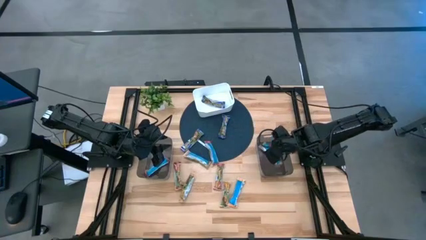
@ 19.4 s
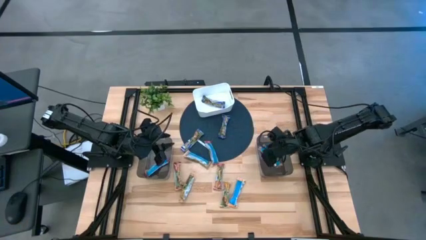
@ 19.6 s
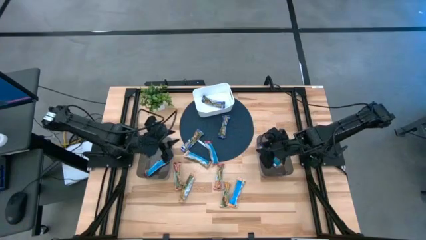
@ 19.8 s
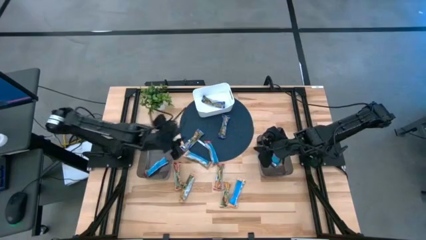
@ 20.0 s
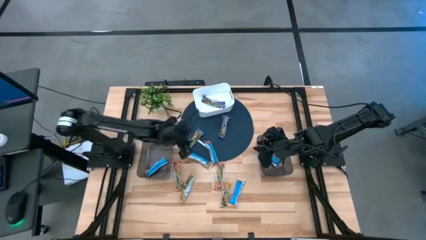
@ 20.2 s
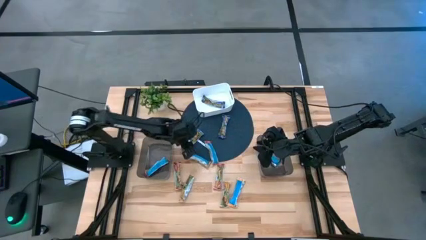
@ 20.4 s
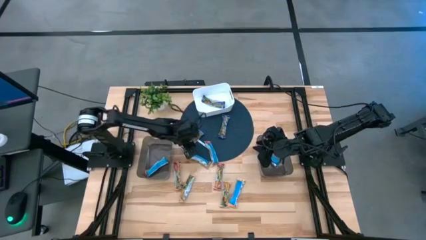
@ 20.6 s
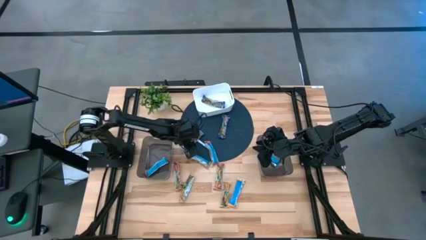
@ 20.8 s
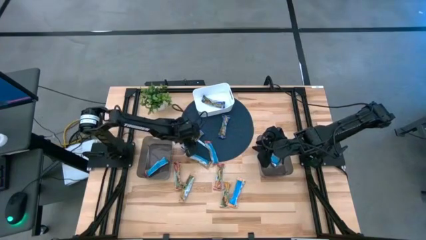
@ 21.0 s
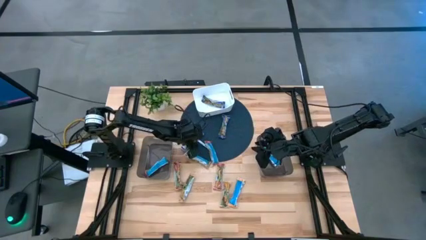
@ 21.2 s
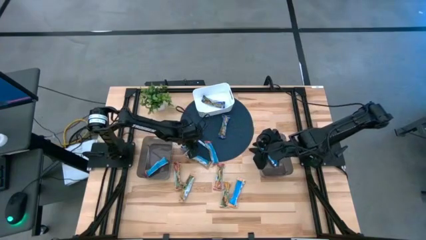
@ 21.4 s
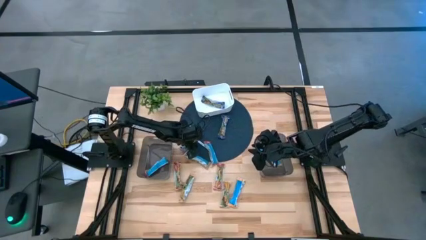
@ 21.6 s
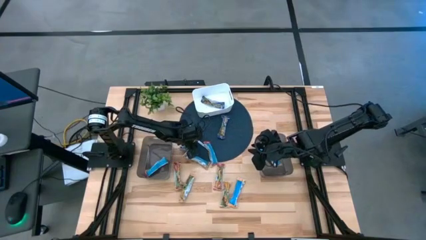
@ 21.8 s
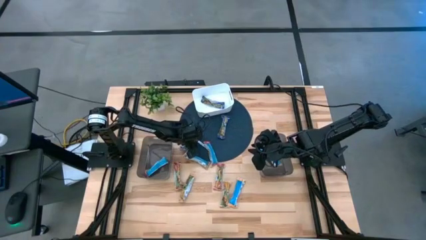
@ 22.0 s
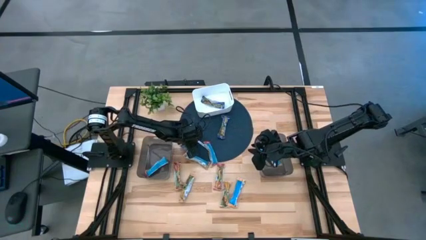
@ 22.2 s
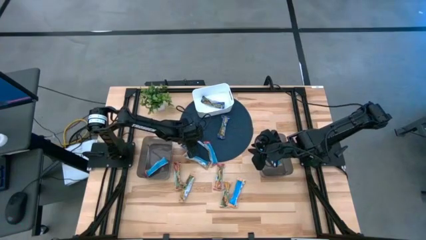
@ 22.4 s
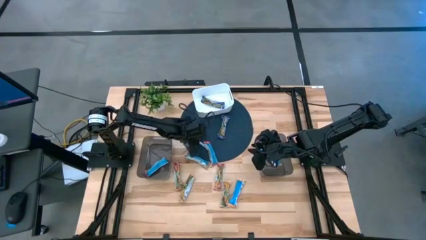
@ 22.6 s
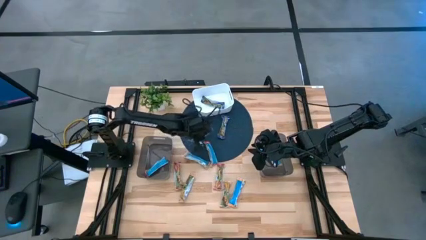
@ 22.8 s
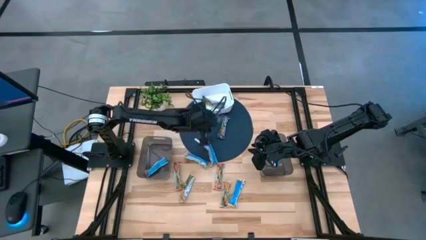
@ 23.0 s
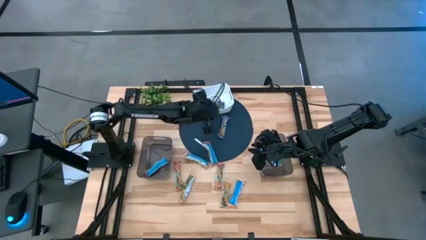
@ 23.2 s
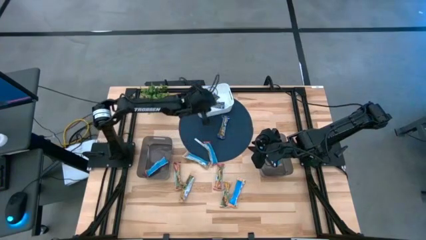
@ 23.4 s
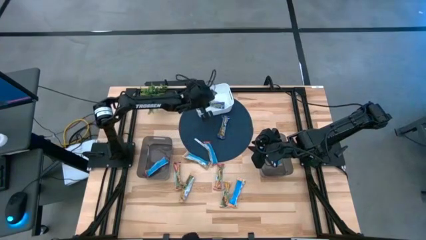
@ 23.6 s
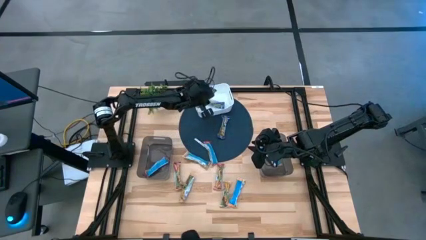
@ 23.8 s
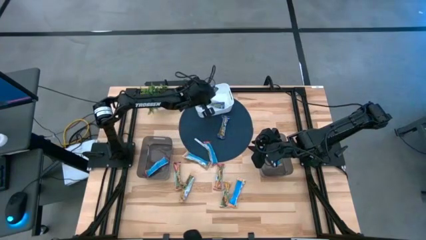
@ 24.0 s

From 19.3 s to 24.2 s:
Task: Pick and place Granola Bars by type
Put the blue granola bar into the white bin

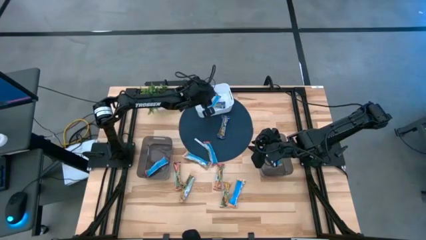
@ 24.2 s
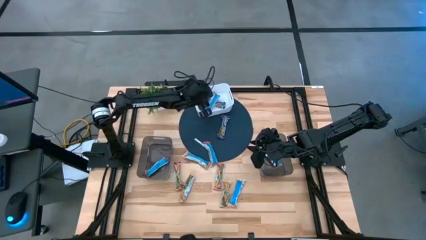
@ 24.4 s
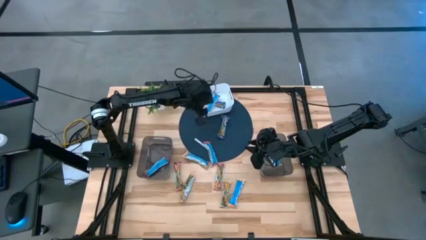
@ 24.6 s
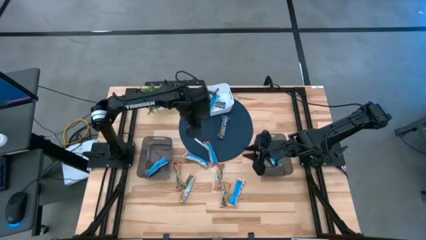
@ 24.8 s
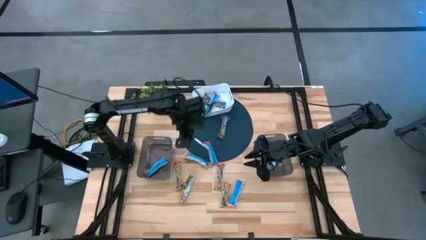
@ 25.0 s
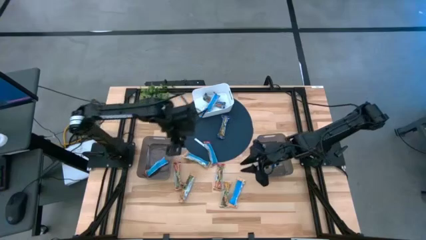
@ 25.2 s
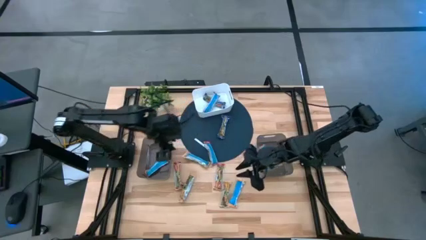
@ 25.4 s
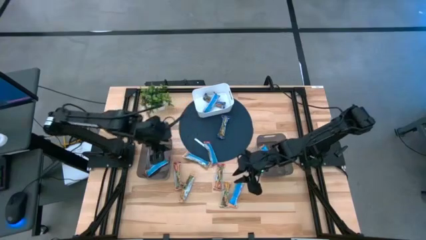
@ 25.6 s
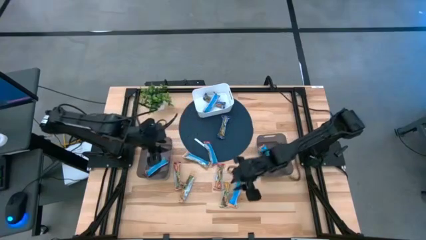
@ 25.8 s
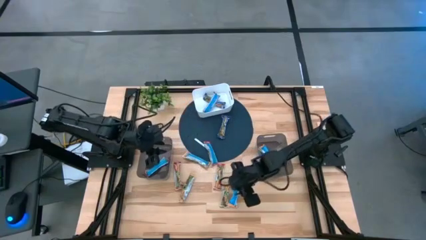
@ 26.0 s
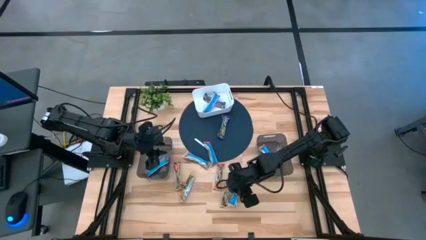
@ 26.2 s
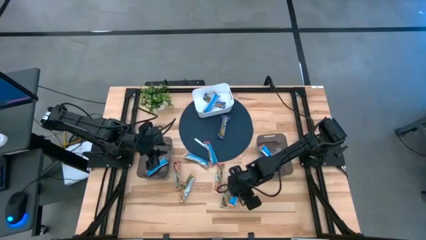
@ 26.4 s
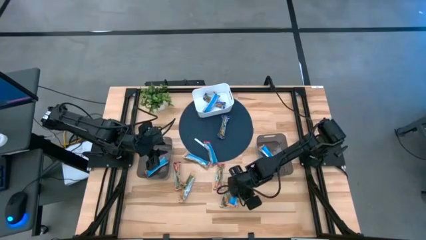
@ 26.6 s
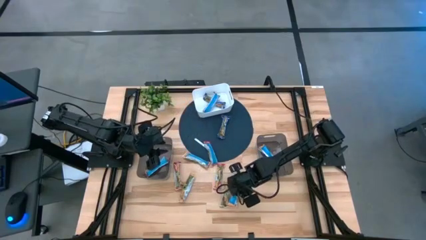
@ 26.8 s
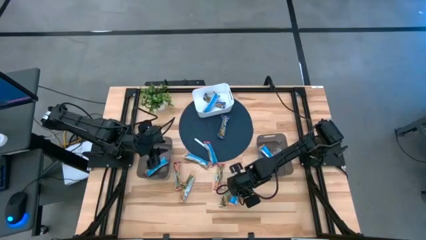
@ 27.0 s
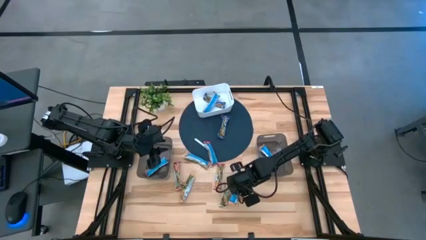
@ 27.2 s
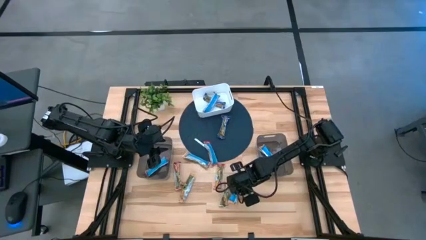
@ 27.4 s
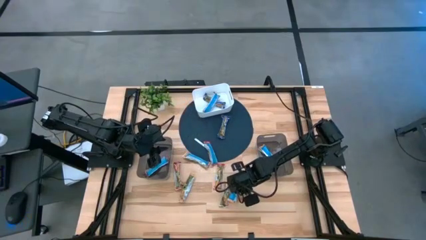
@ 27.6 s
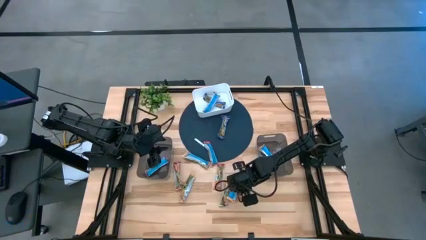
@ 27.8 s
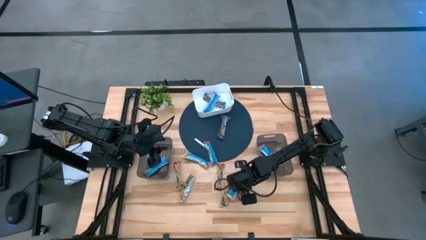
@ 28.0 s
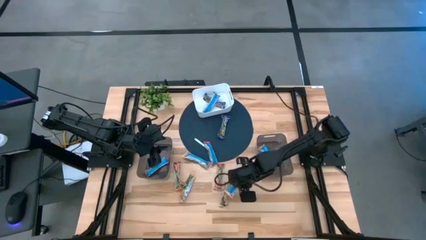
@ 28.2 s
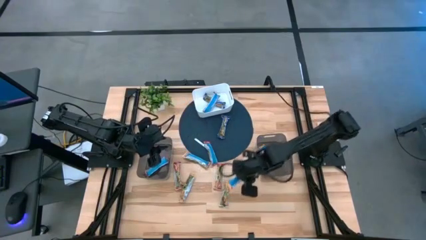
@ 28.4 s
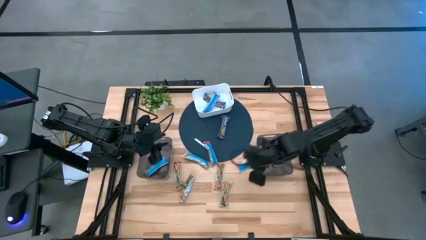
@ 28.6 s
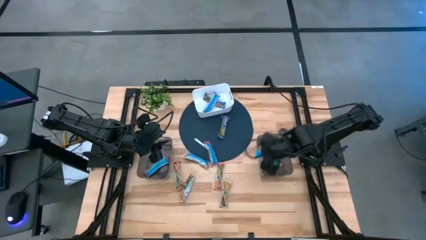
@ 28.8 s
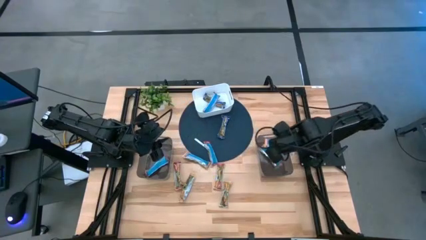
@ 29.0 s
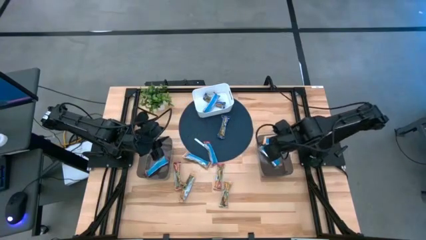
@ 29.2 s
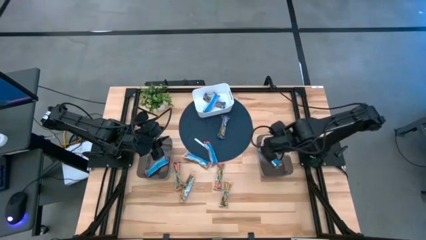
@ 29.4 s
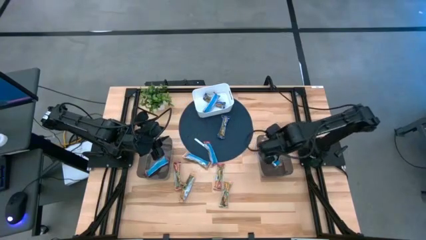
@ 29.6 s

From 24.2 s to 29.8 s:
Put the yellow granola bar into the right black bin

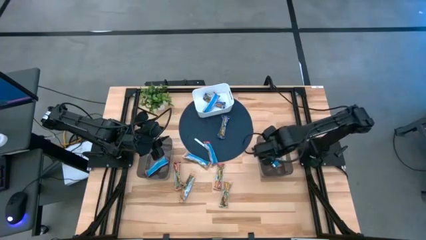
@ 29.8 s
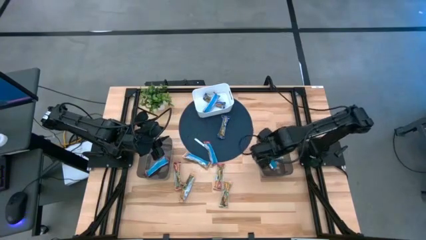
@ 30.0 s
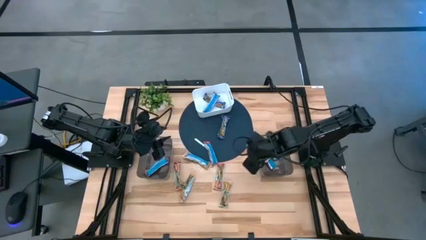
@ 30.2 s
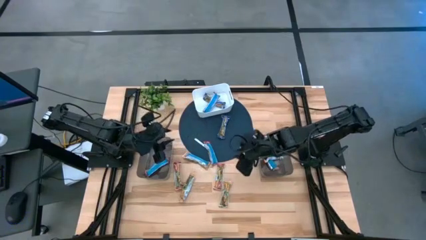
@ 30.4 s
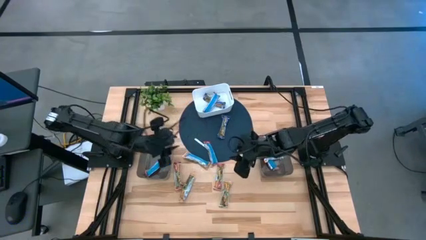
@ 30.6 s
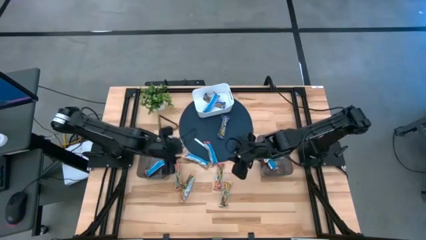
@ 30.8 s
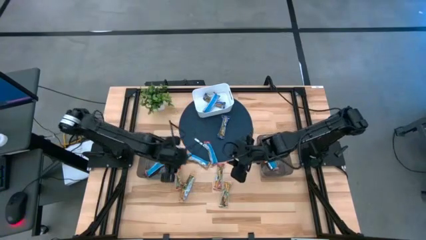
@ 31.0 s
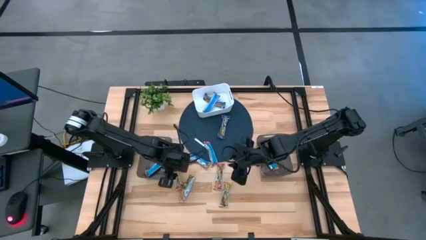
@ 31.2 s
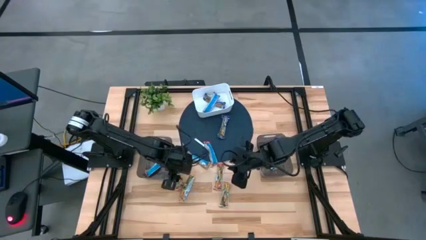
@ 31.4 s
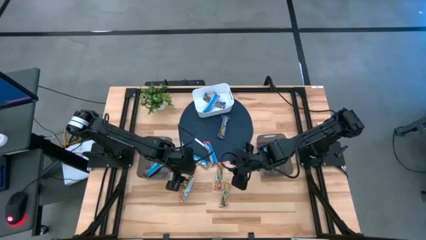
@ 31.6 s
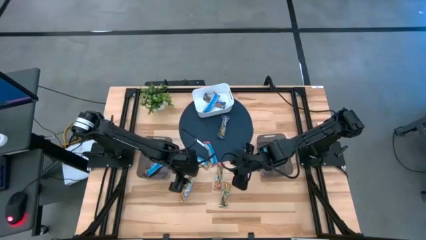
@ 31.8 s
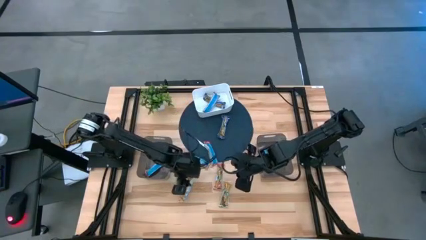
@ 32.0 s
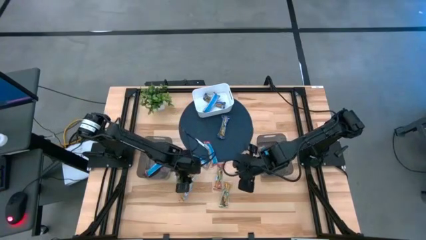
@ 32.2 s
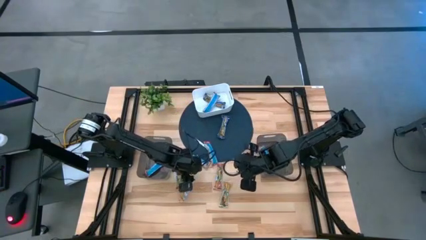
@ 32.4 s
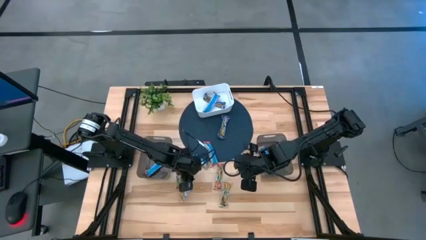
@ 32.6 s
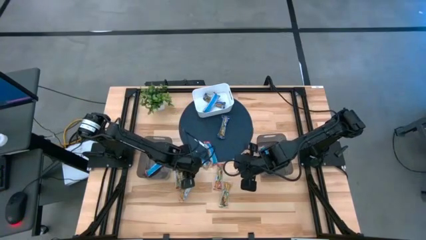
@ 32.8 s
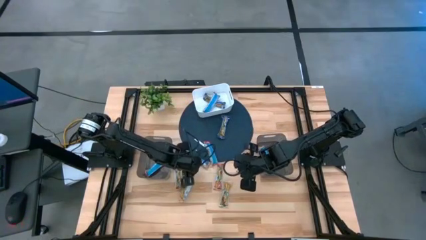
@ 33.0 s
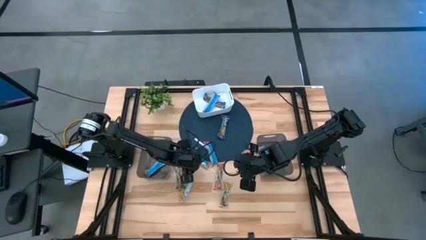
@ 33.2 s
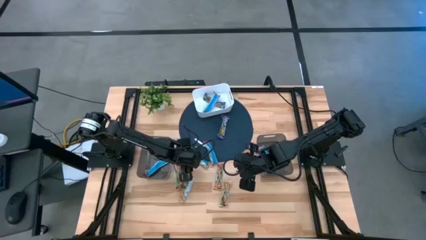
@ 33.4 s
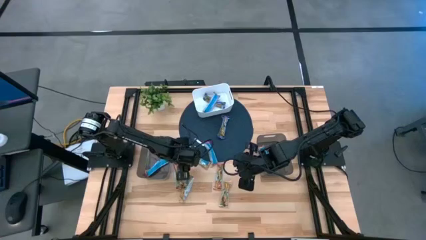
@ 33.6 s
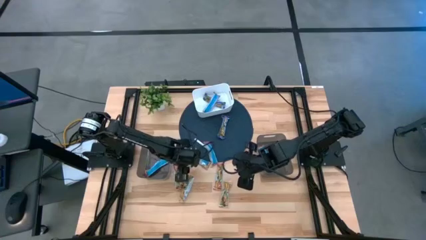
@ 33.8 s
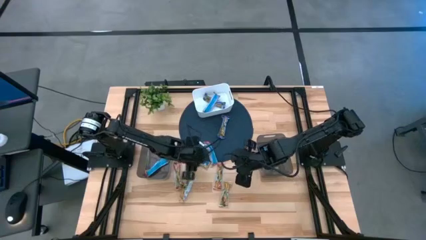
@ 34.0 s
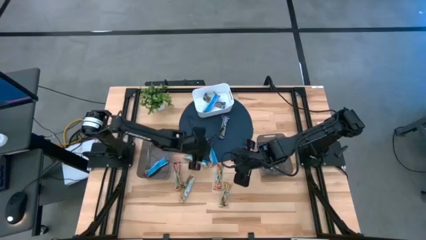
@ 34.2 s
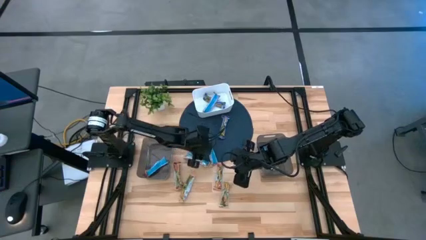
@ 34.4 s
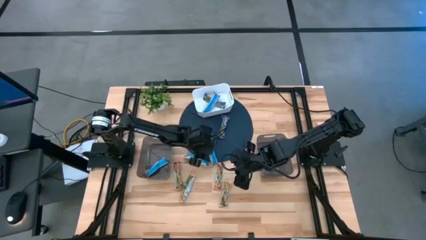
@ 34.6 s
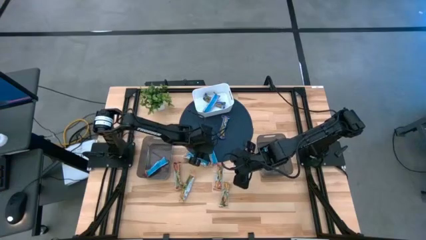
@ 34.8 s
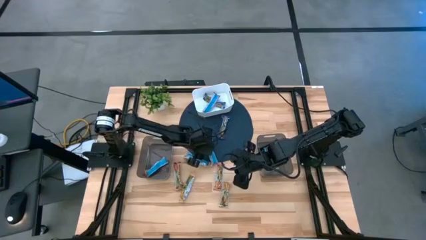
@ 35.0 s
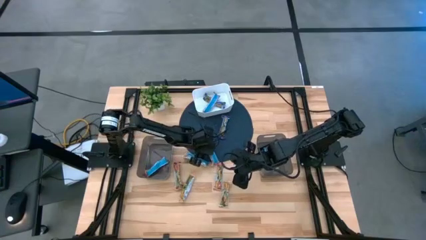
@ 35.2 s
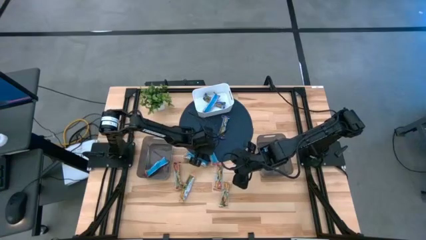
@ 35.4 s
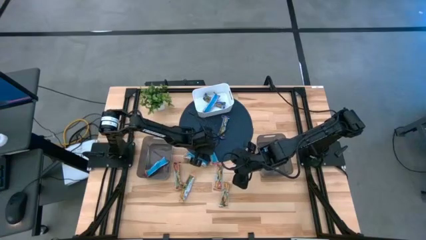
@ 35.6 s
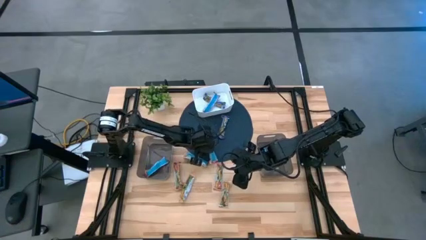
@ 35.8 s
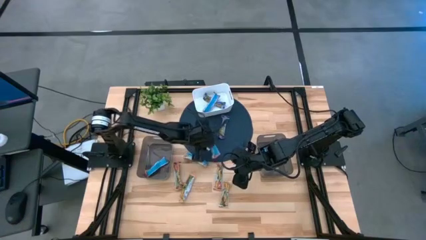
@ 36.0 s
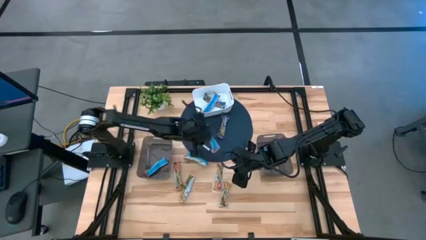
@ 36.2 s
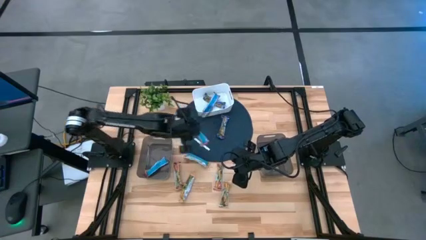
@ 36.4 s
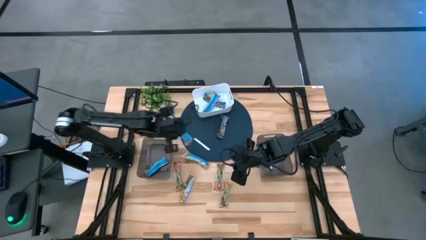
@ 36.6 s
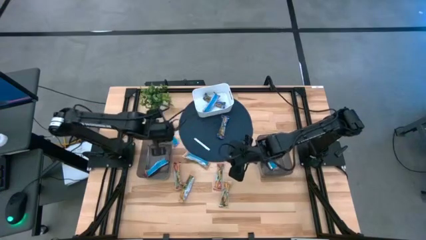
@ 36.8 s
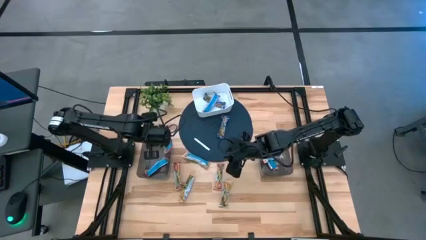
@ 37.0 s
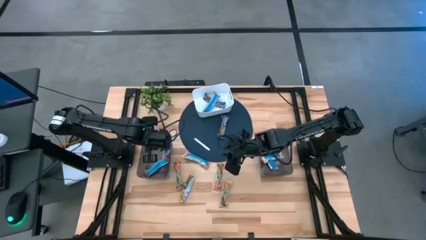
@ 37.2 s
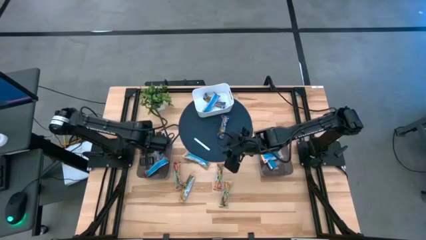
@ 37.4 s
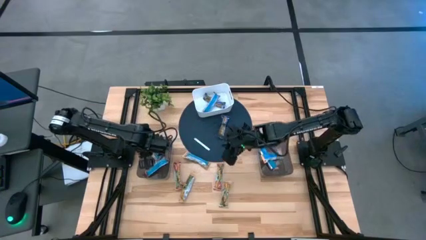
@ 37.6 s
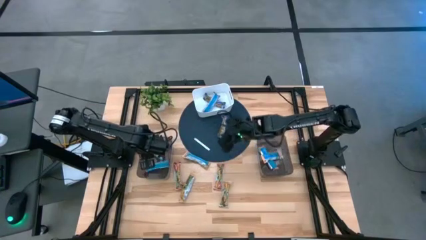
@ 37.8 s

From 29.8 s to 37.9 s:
Put the red granola bar into the left black bin
